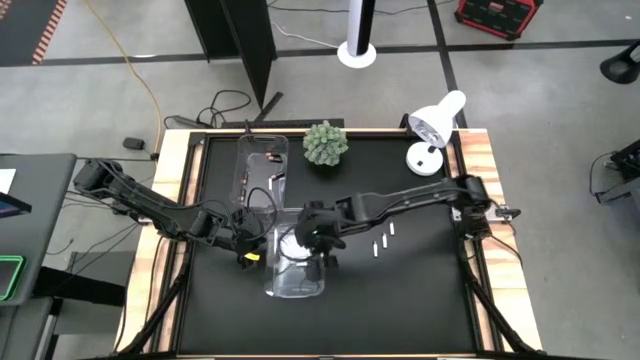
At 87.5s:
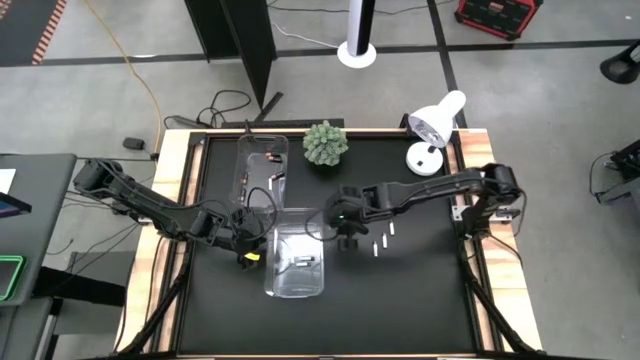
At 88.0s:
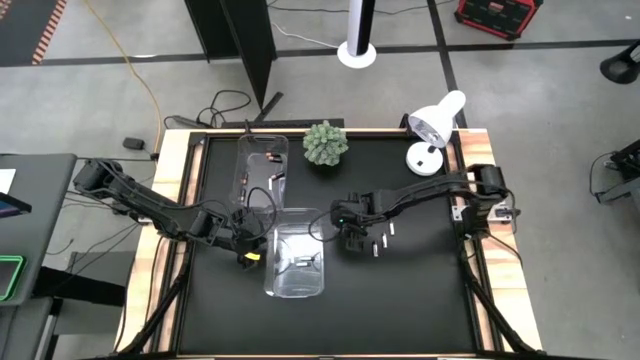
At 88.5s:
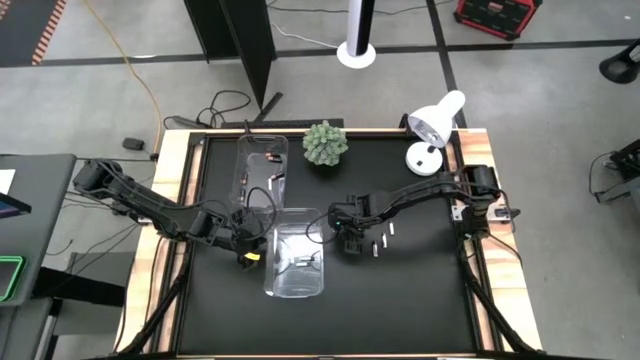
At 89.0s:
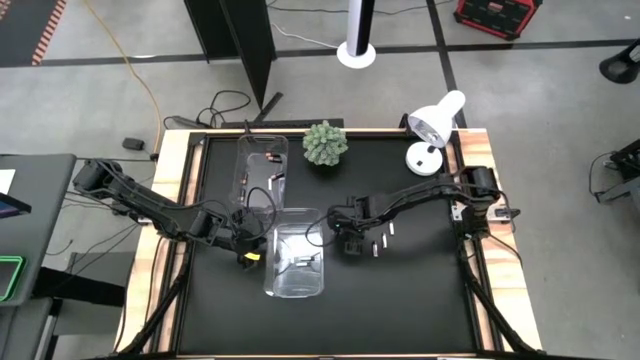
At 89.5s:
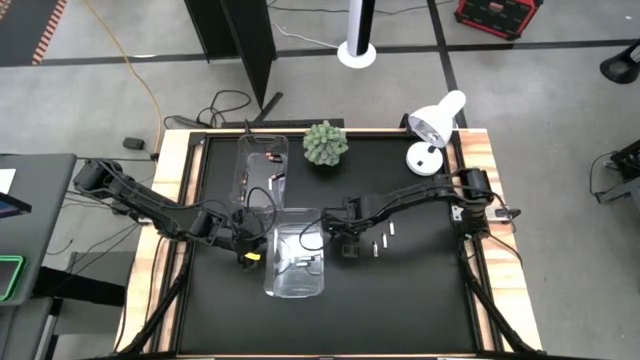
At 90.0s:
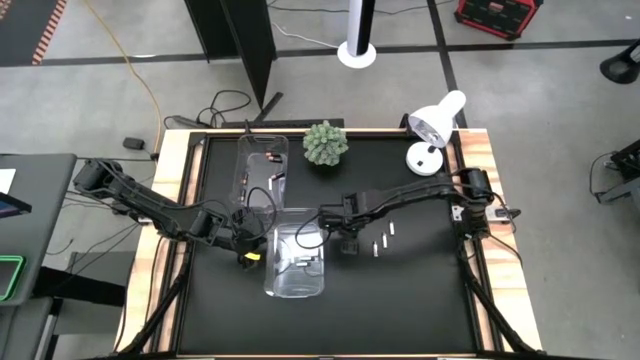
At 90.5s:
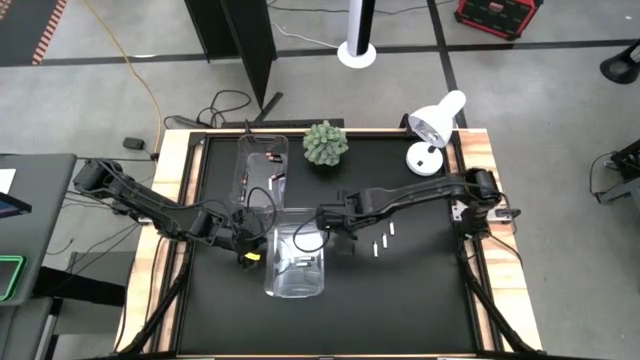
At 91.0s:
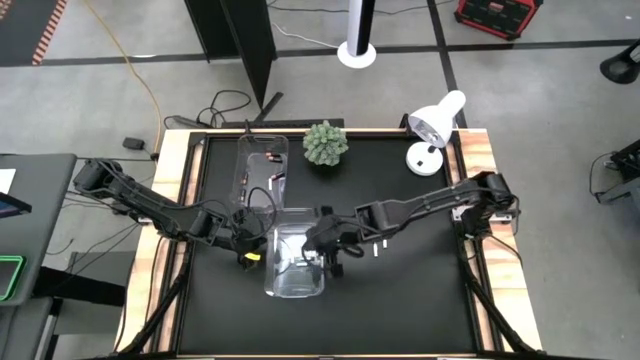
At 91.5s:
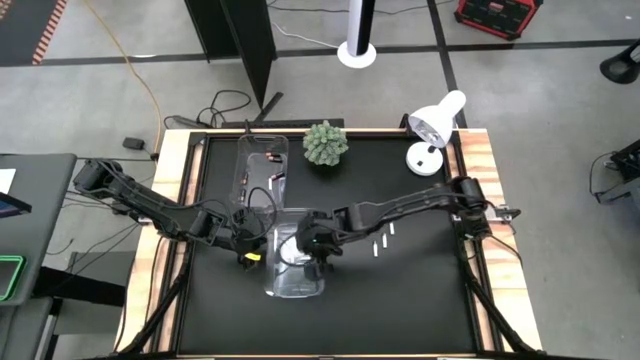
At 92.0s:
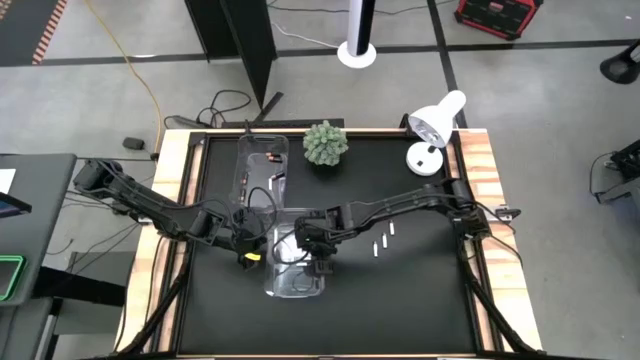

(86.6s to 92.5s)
Task: Sort batteries
Put the silver and black battery into the center transparent bin

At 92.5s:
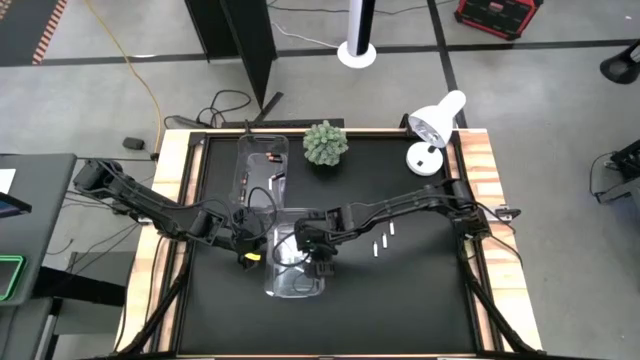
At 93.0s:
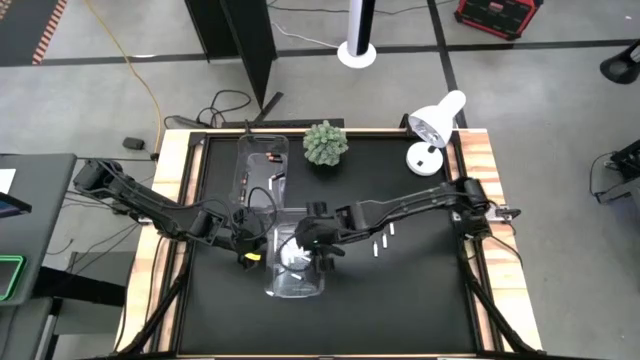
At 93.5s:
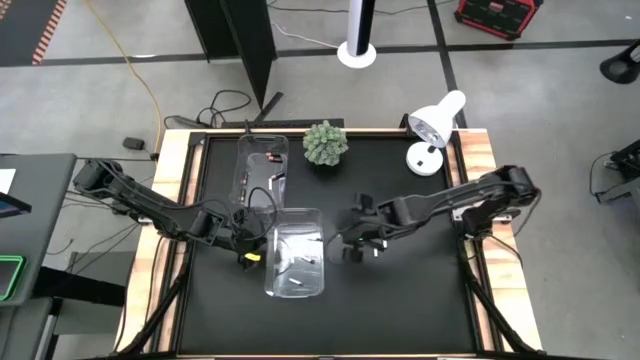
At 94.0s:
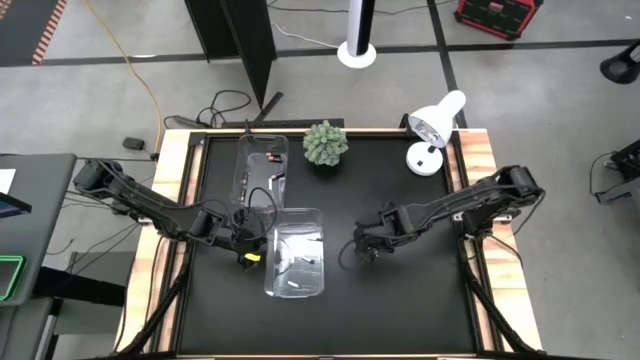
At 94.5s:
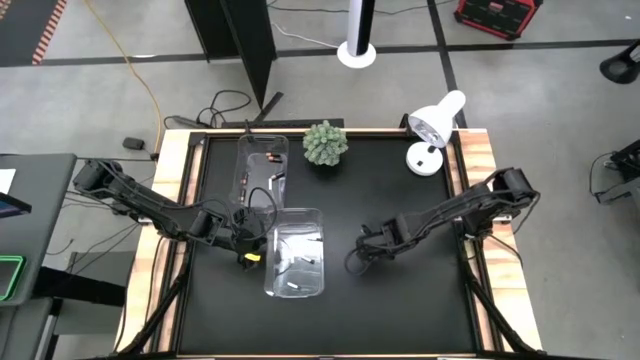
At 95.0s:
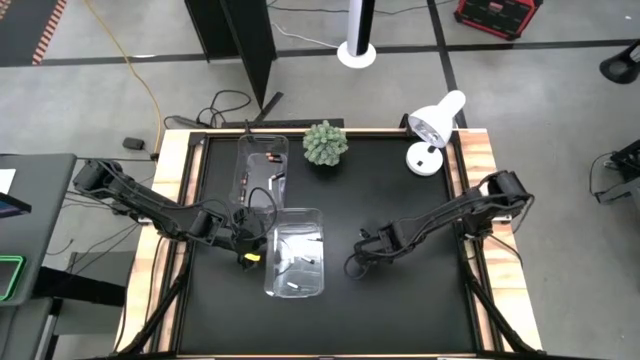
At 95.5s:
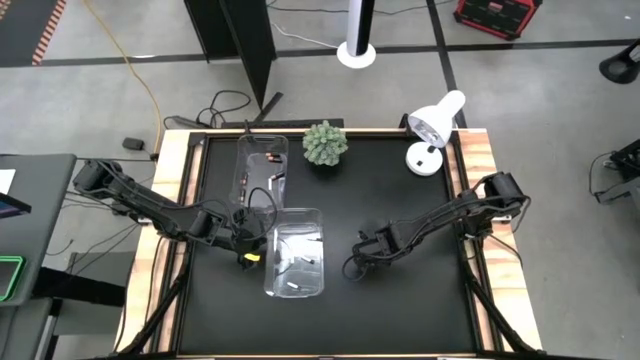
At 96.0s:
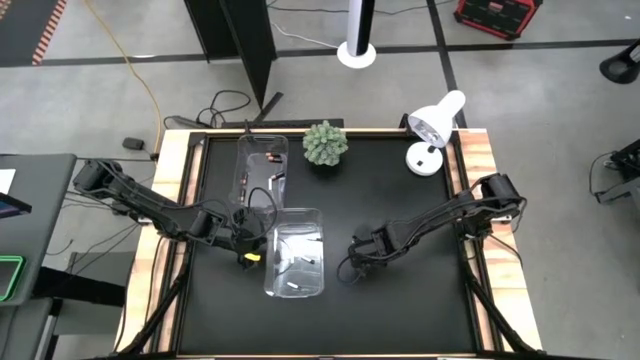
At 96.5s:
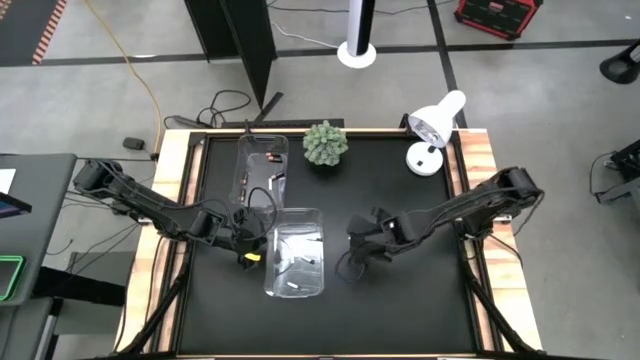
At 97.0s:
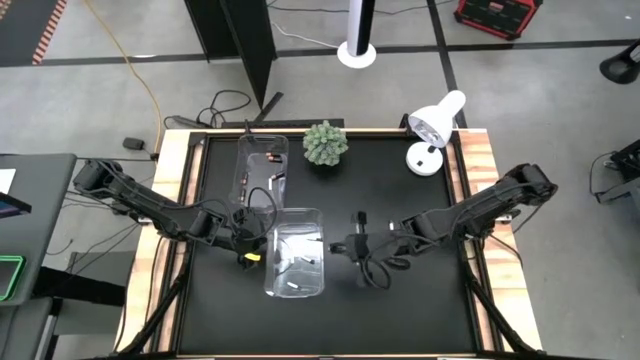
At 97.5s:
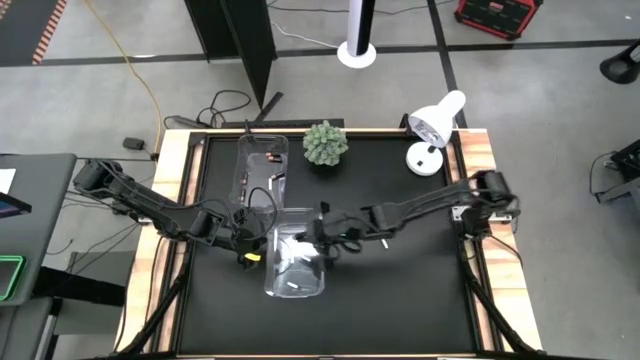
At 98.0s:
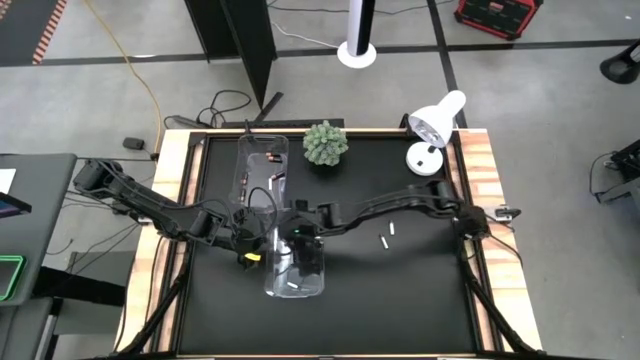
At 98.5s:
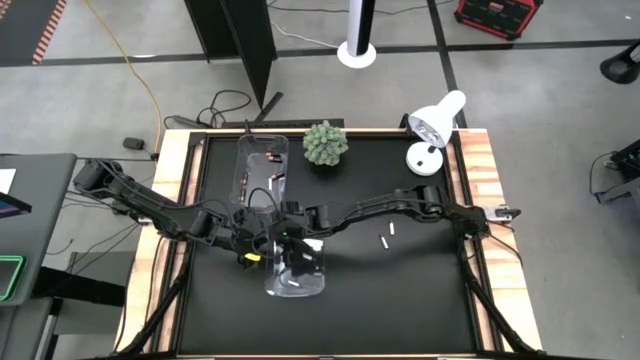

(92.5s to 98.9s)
Put the silver and black battery into the center transparent bin

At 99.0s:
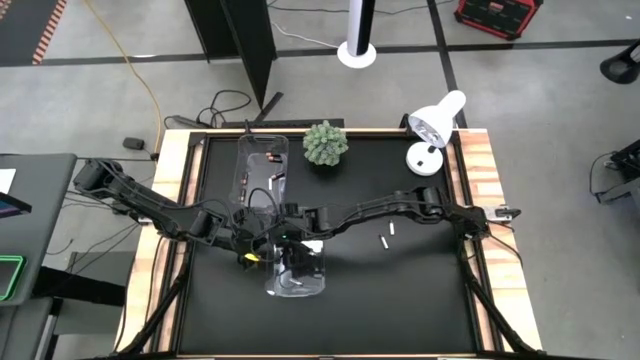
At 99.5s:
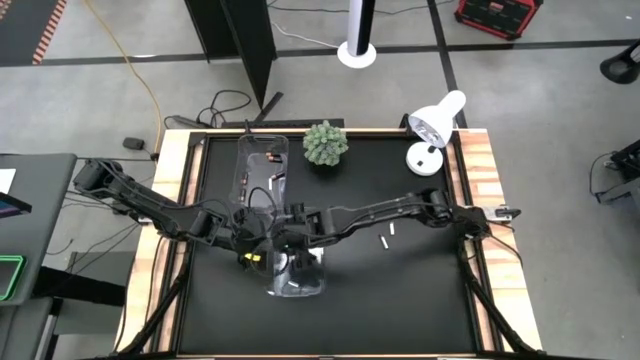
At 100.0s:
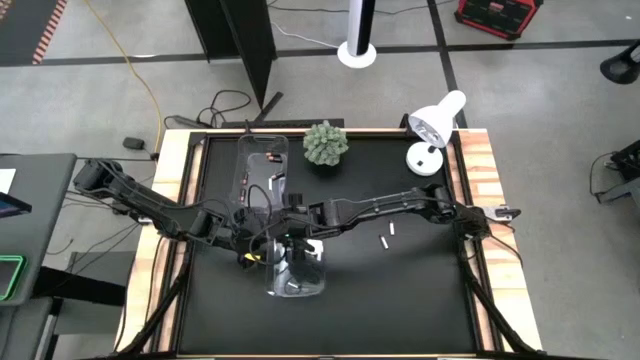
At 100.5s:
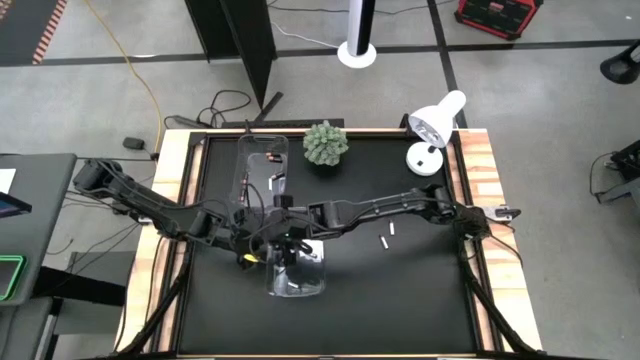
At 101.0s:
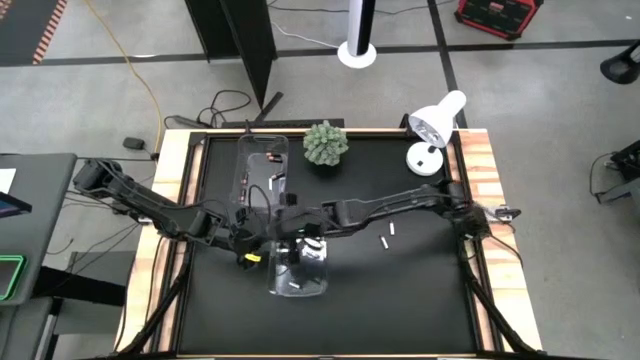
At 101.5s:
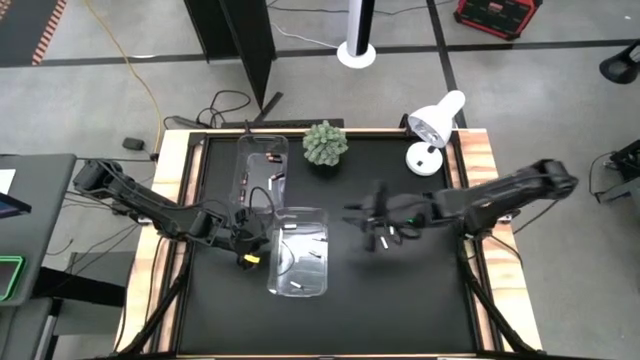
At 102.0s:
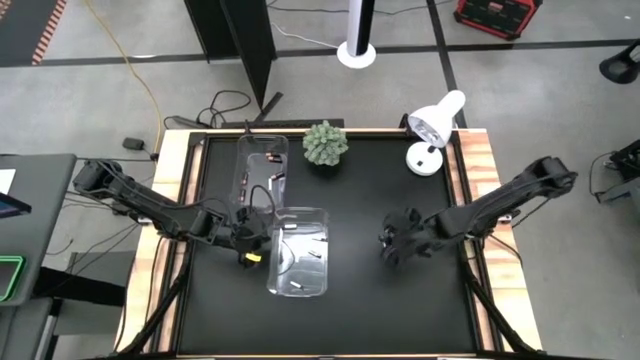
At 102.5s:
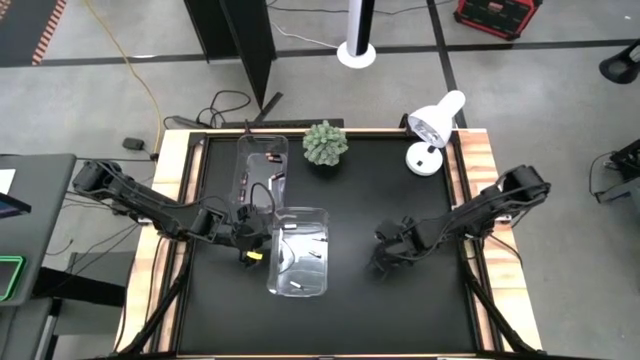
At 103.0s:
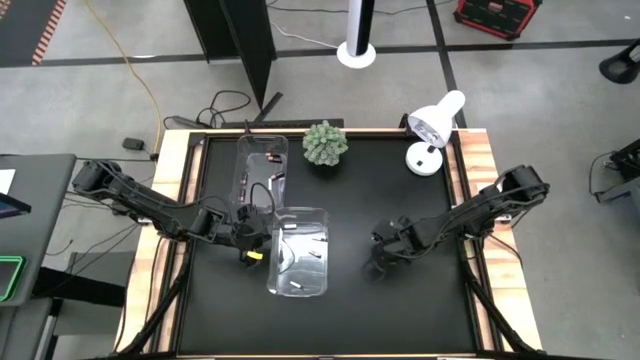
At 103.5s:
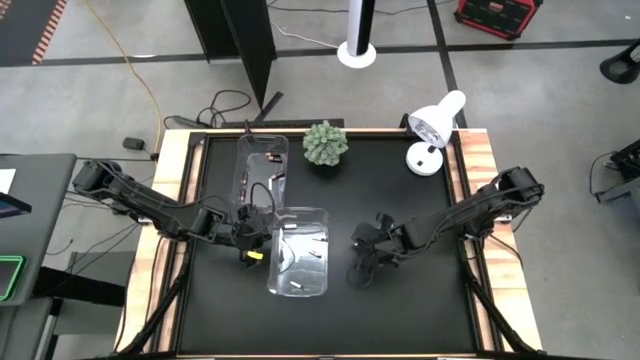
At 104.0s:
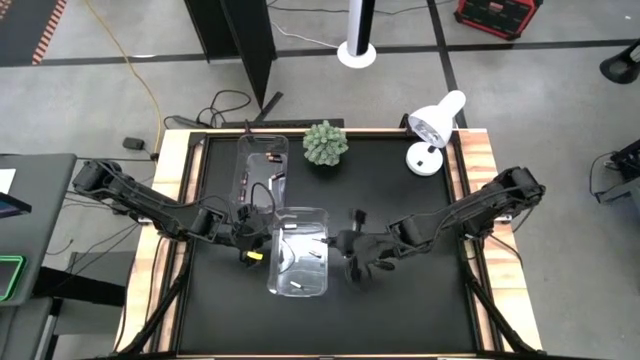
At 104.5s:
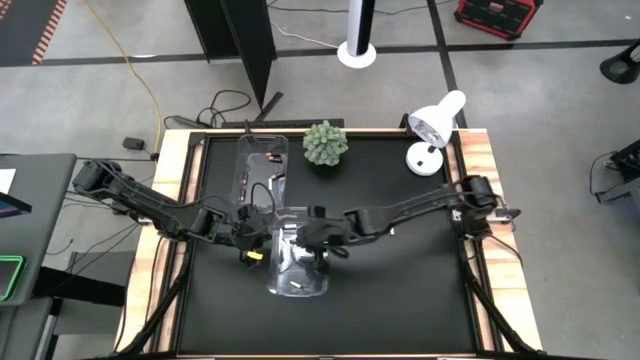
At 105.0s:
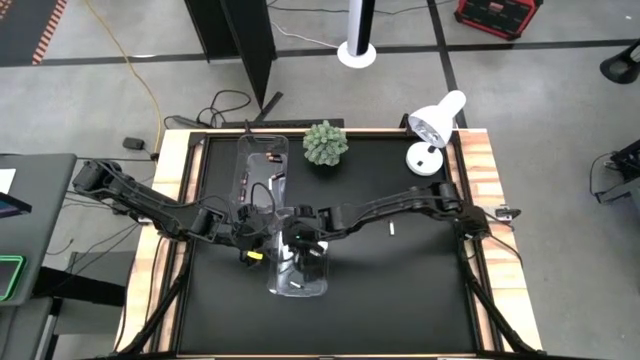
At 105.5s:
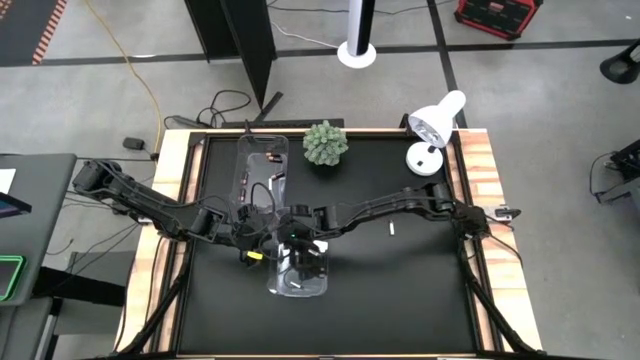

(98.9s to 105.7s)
Put the silver and black battery into the center transparent bin
